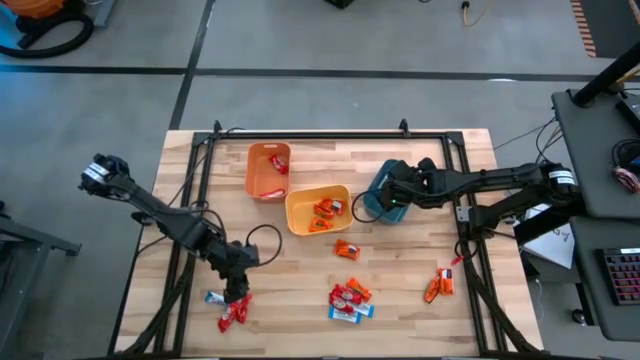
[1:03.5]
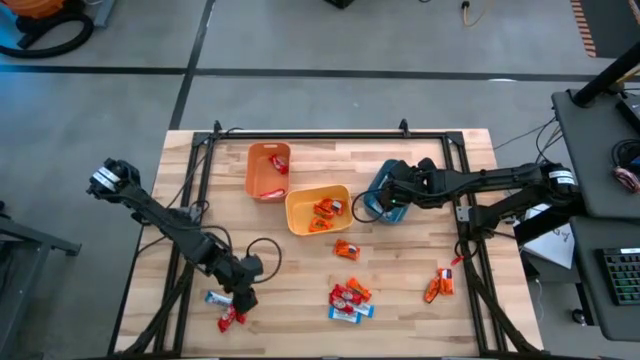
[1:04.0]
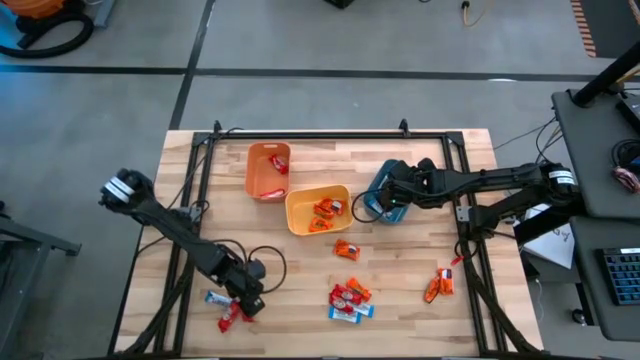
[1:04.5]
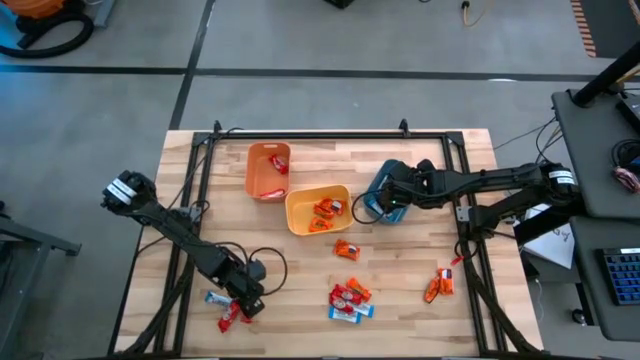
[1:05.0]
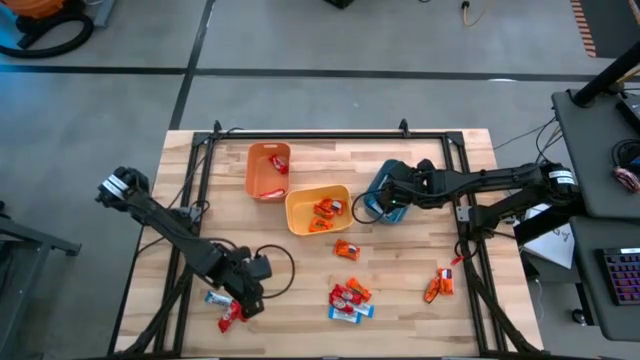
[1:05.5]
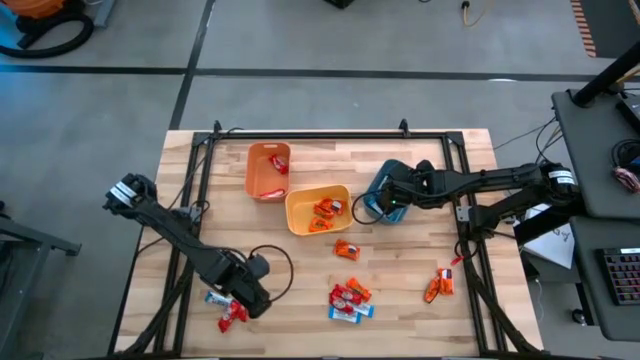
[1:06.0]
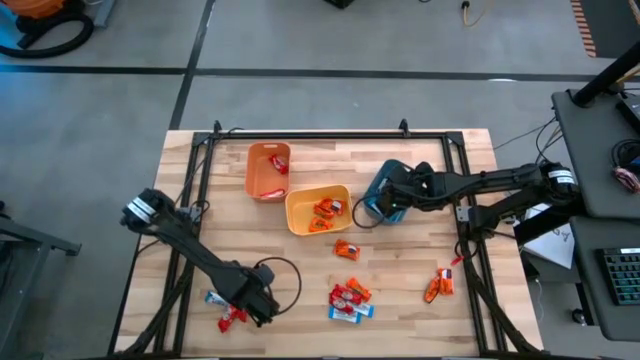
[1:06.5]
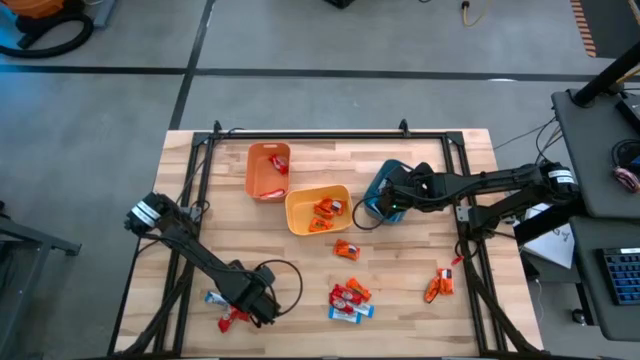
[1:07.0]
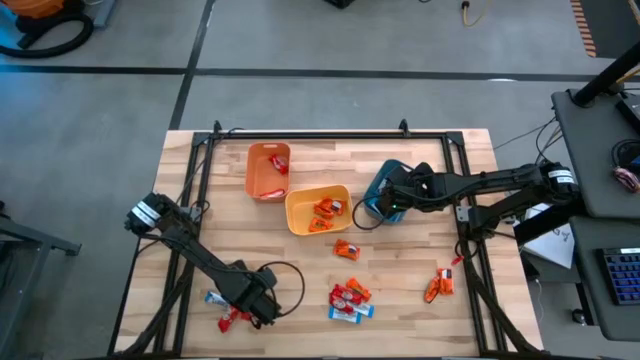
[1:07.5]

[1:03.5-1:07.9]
Task: Sort candy
Put the red chocolate into the orange bin

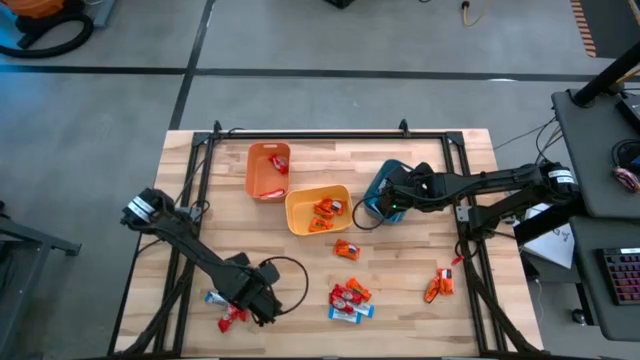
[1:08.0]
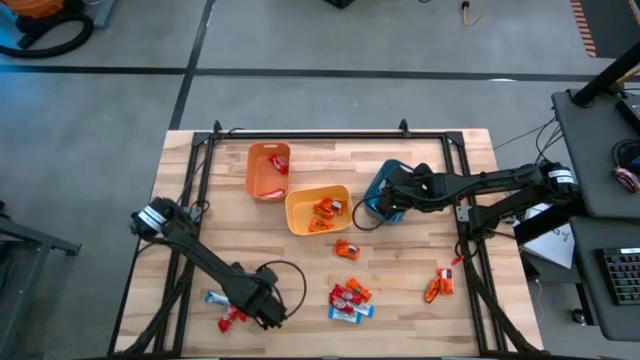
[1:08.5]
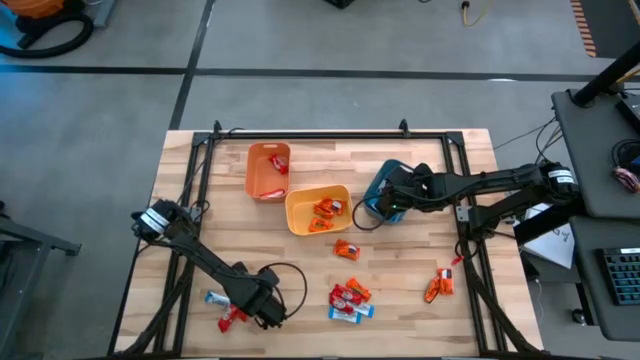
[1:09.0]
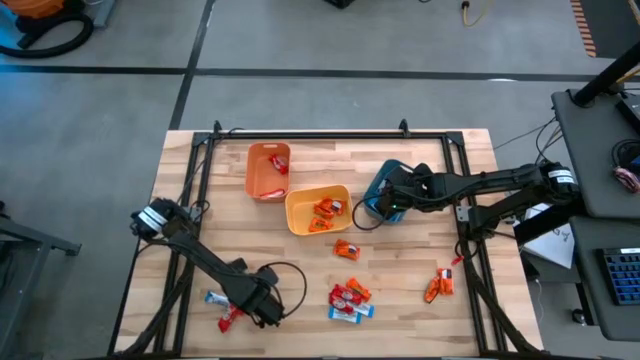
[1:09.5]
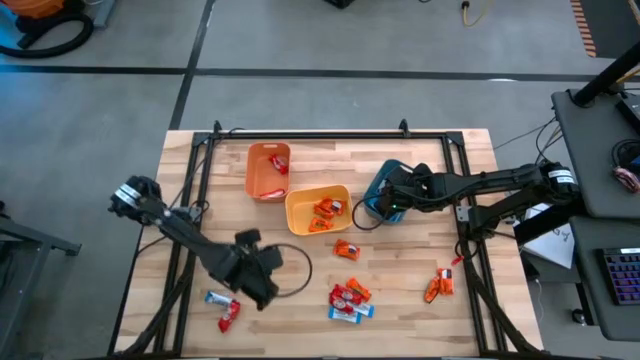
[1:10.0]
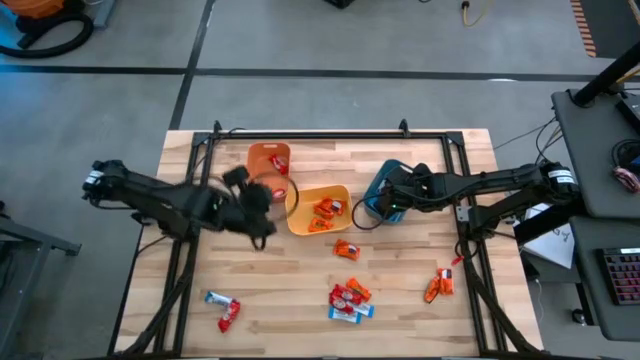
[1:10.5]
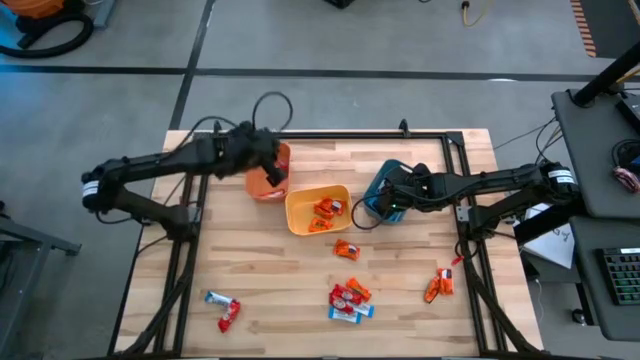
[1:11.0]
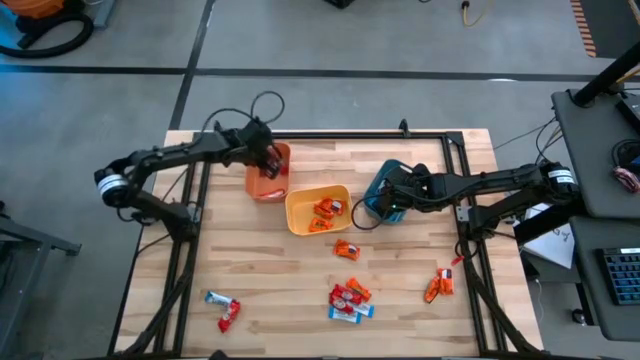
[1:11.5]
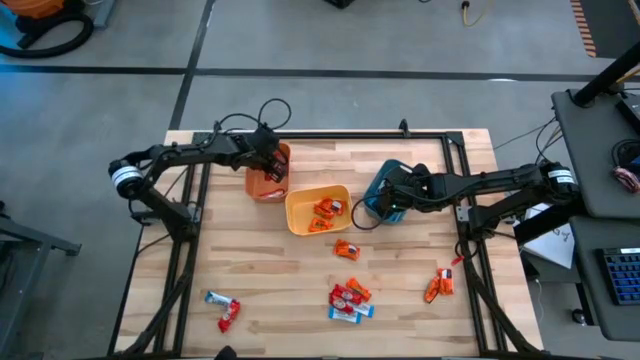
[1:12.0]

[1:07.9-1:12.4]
Put the red chocolate into the orange bin

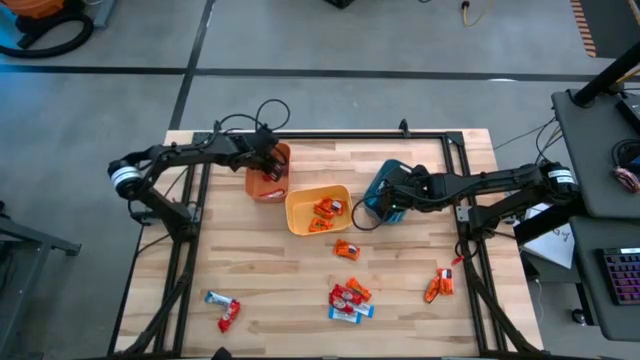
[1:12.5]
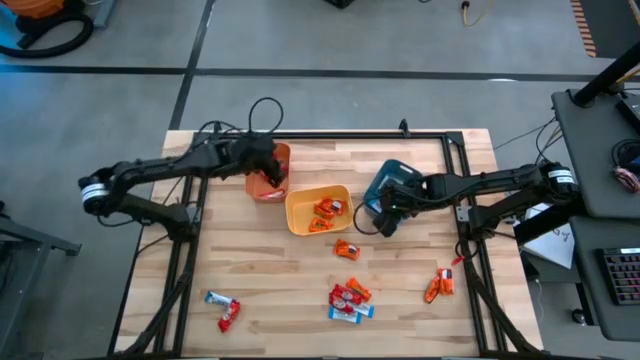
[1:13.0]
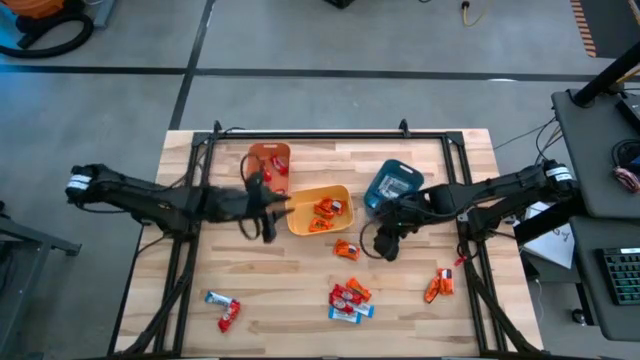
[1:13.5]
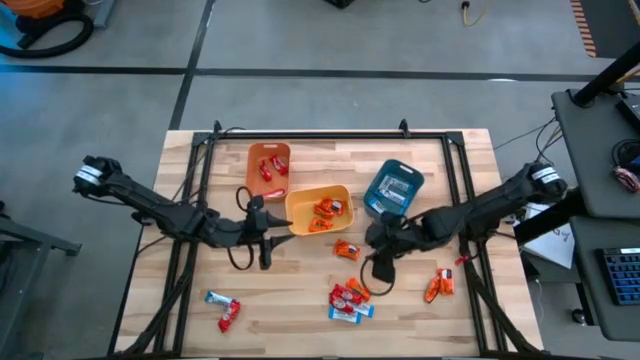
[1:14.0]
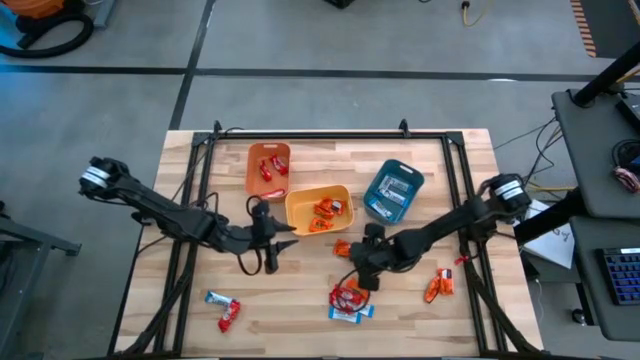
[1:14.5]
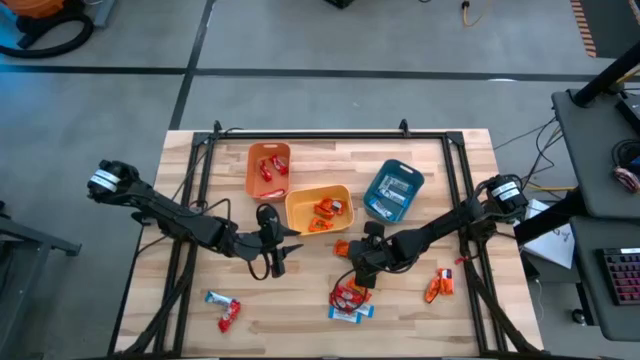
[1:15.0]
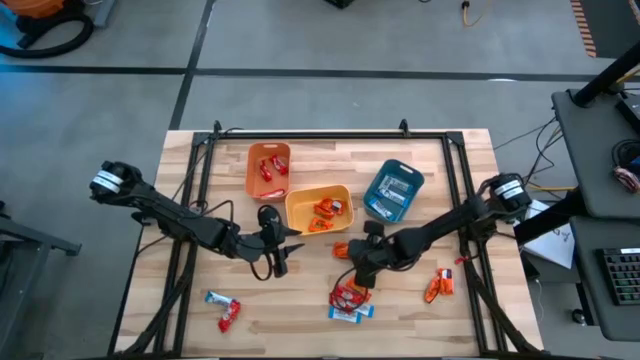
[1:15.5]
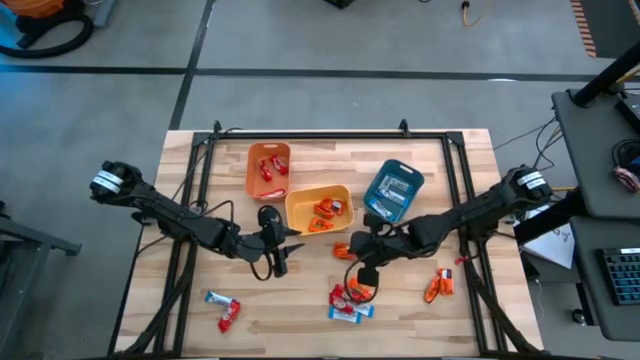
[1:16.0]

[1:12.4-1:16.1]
Put the orange chocolate into the yellow bin

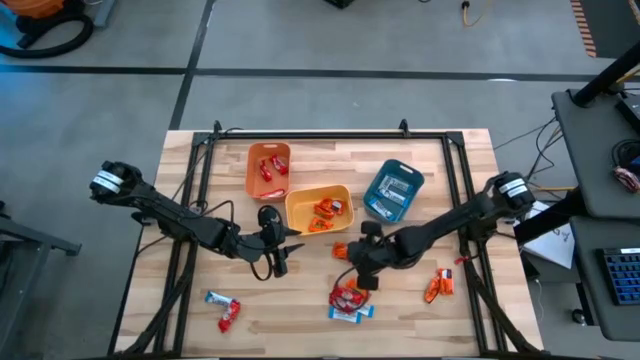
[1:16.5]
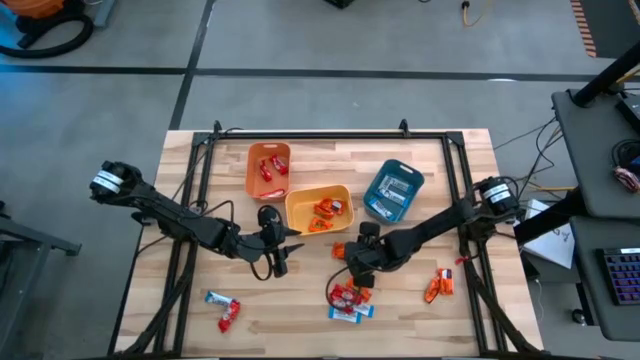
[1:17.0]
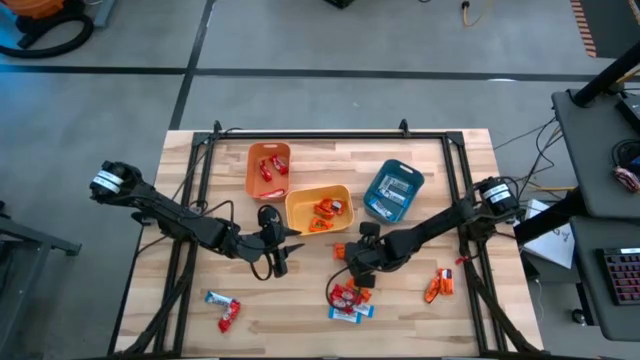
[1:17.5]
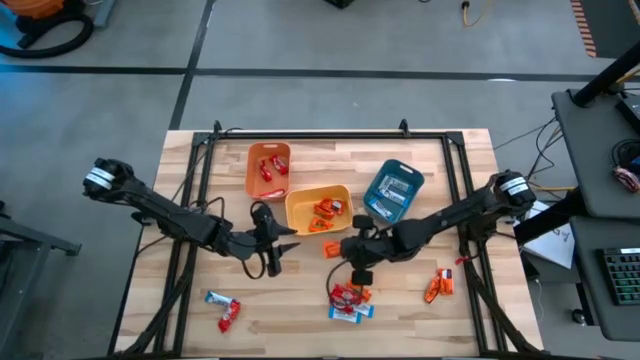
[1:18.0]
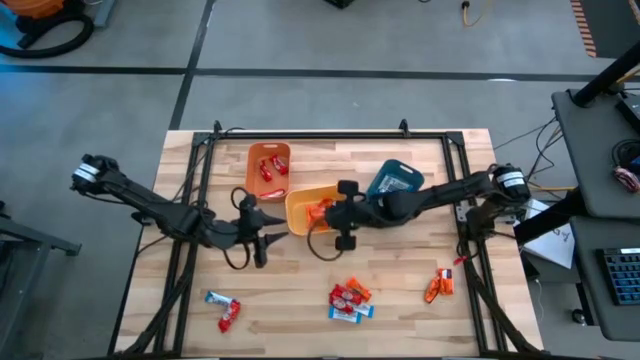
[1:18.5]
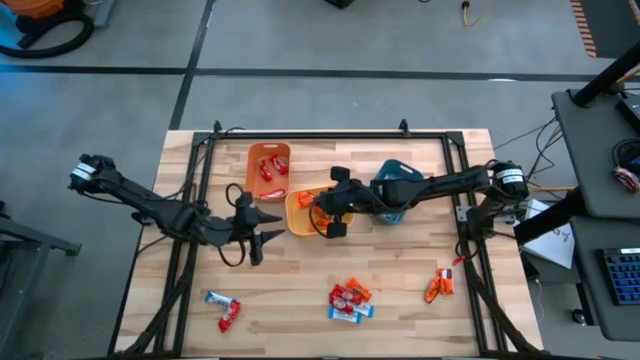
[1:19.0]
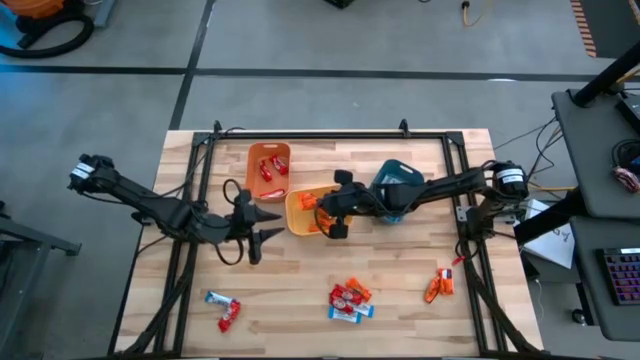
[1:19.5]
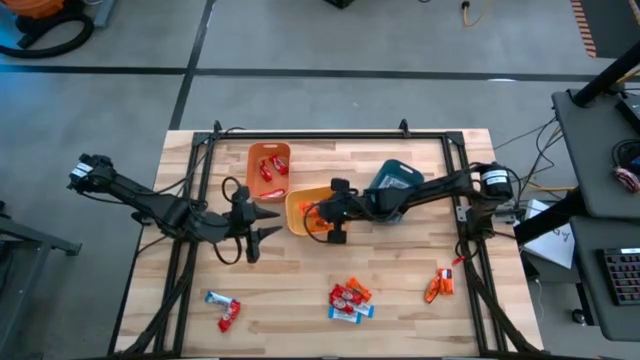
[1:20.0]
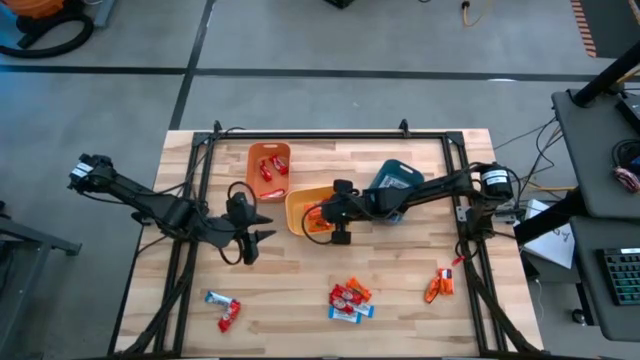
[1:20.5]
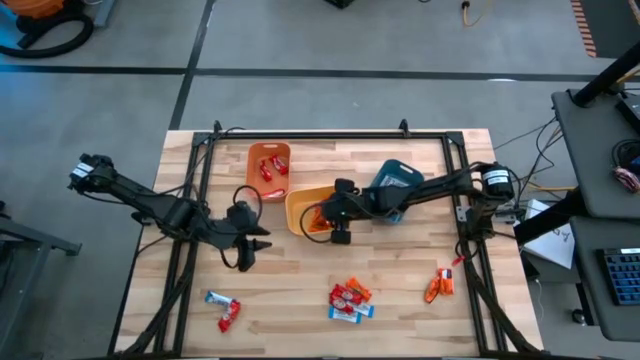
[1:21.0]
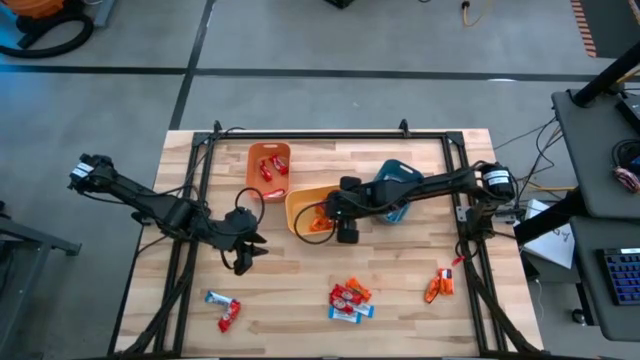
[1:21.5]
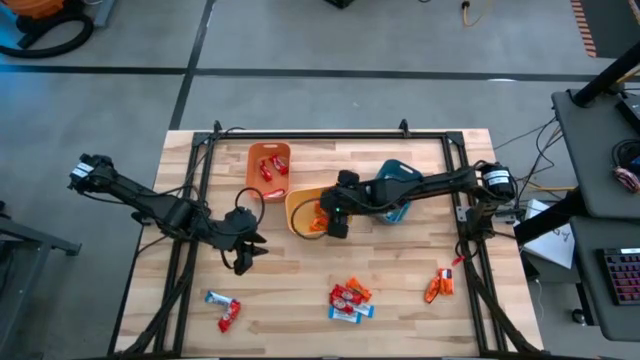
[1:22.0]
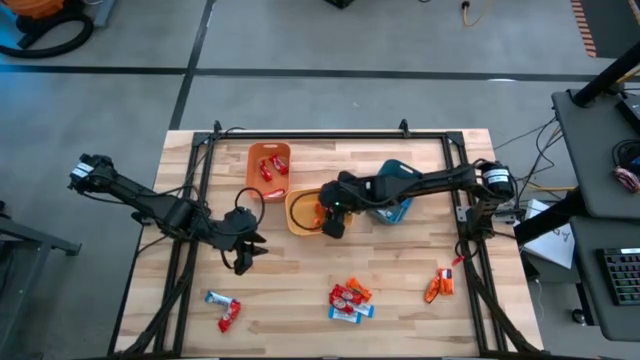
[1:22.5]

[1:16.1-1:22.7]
Put the orange chocolate into the yellow bin

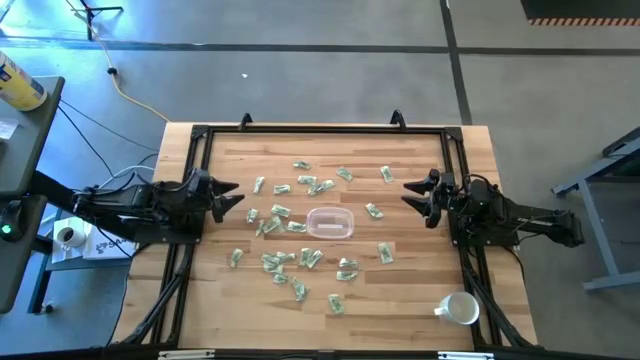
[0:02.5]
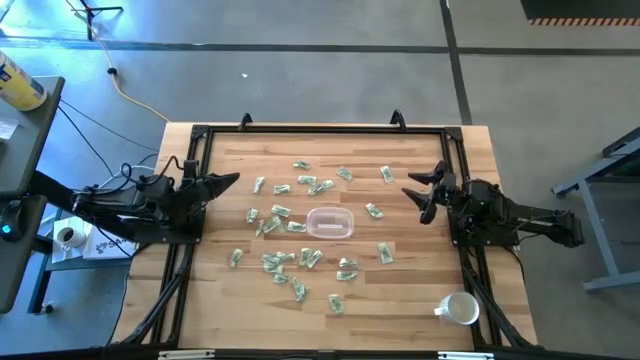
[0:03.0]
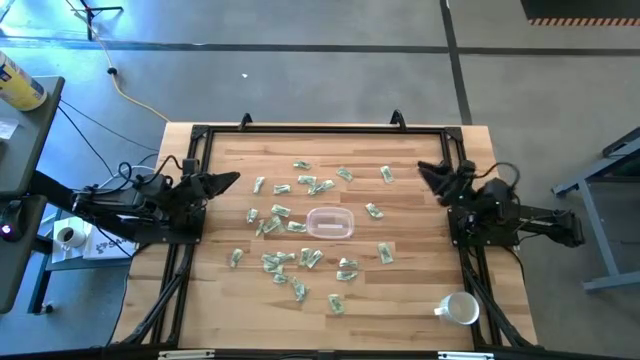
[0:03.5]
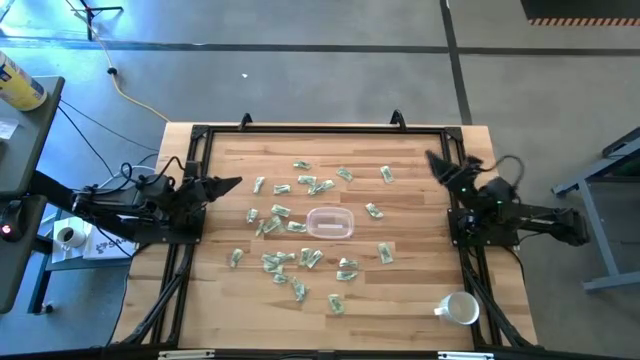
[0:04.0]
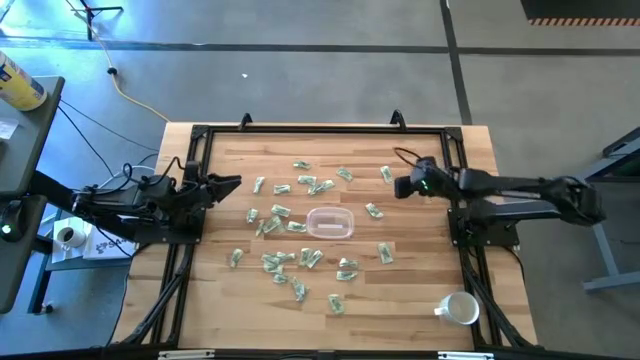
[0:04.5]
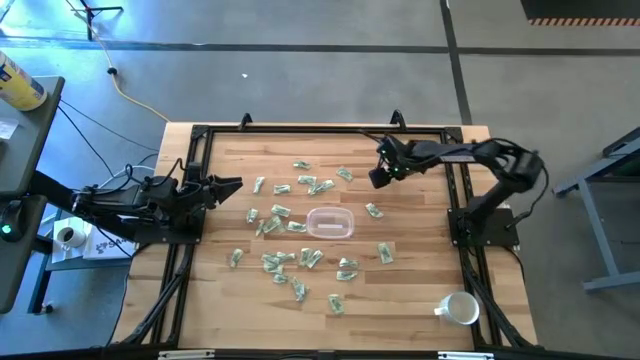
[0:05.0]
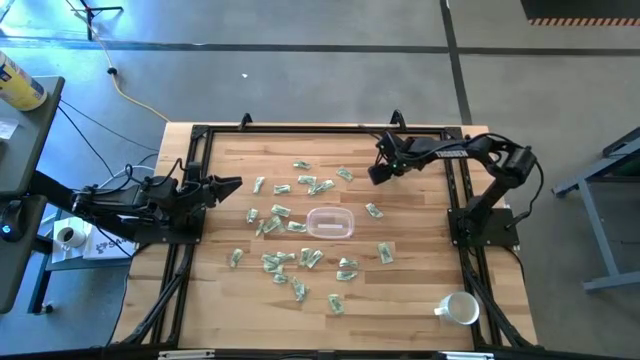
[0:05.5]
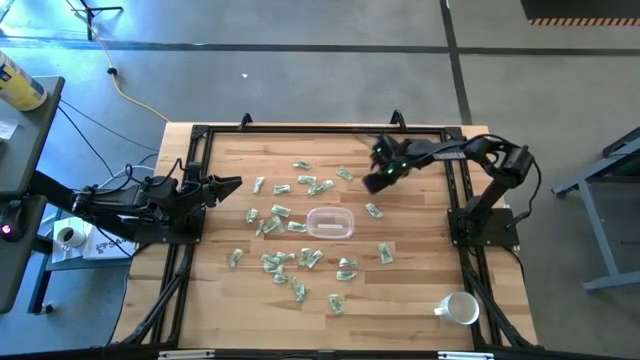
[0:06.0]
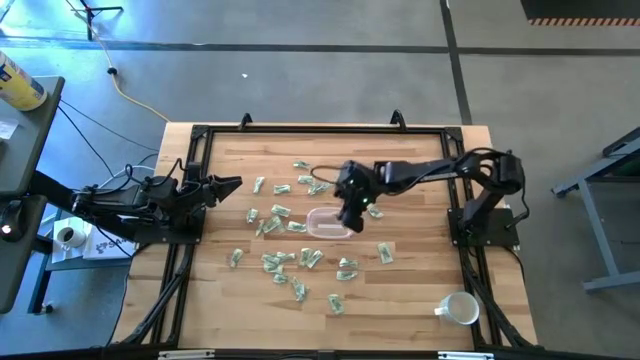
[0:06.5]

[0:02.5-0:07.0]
Task: Pick and place Stevia / Truvia into bins
Put the stevia packet into the transparent container
